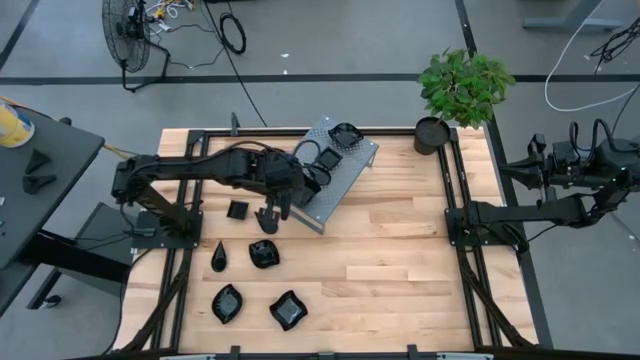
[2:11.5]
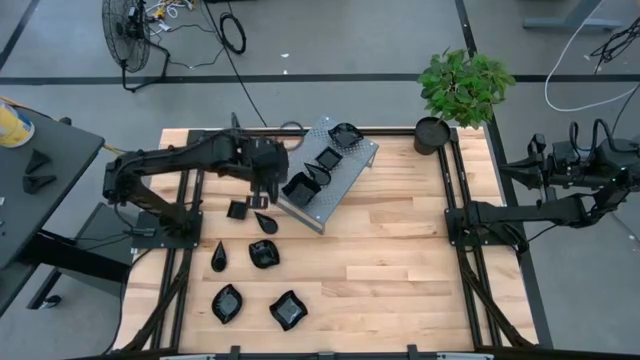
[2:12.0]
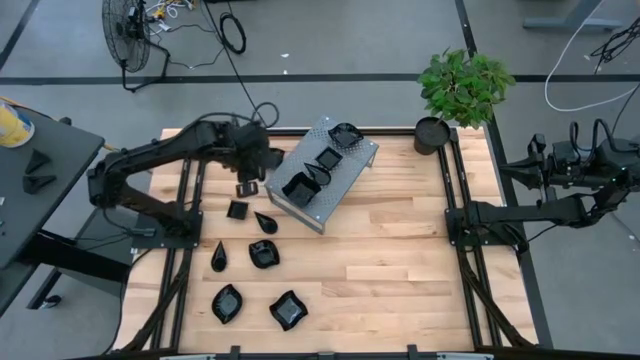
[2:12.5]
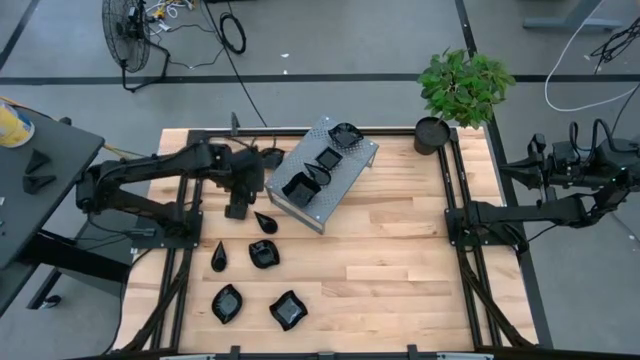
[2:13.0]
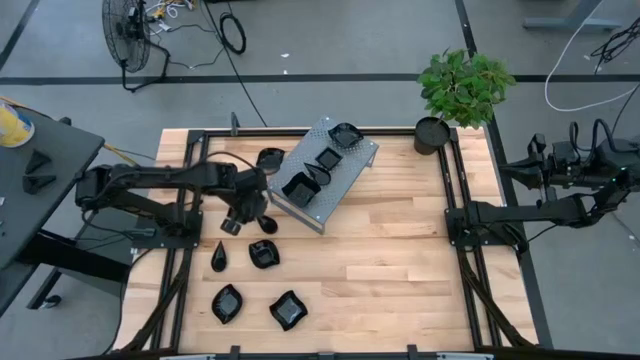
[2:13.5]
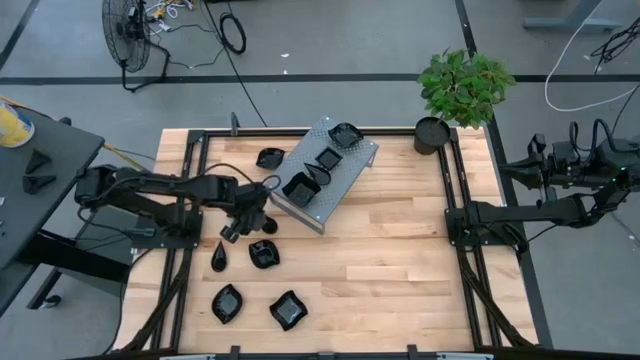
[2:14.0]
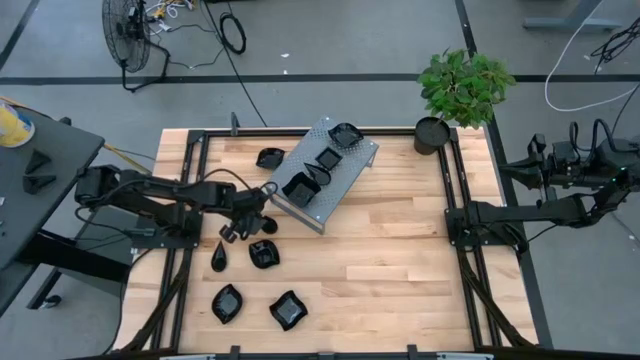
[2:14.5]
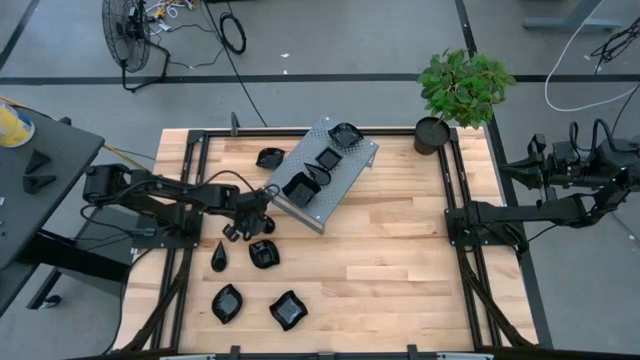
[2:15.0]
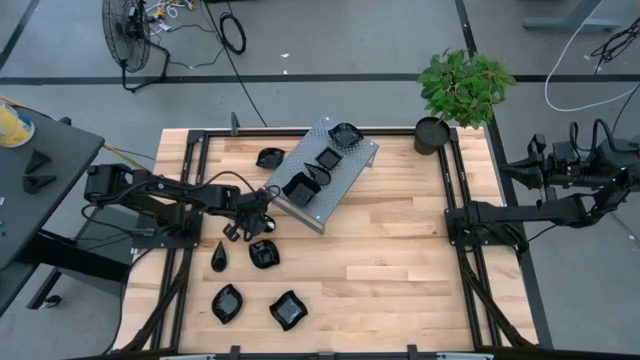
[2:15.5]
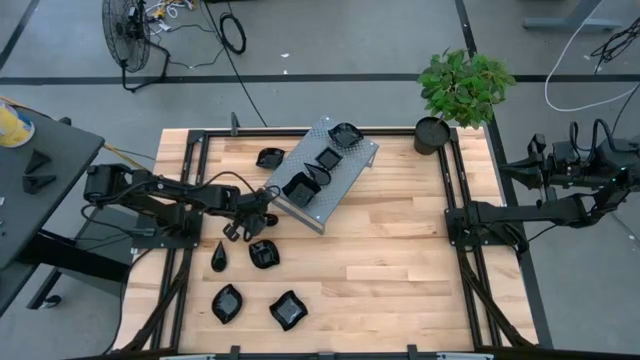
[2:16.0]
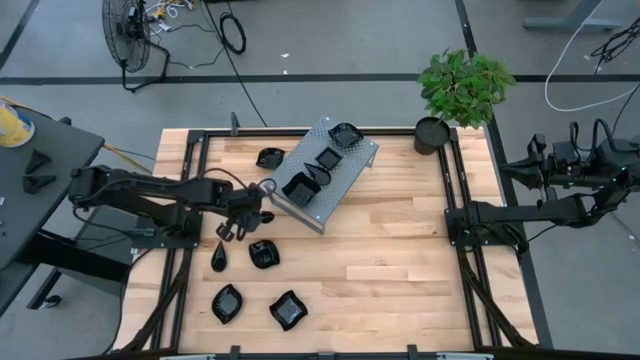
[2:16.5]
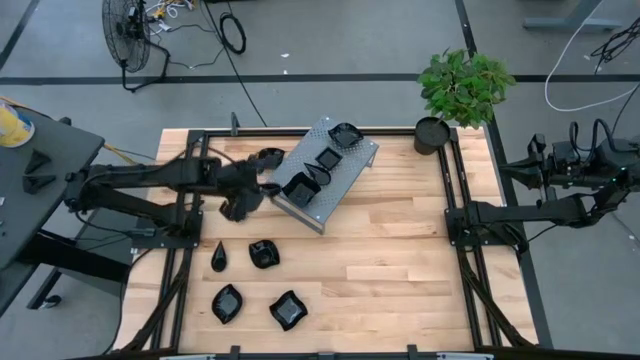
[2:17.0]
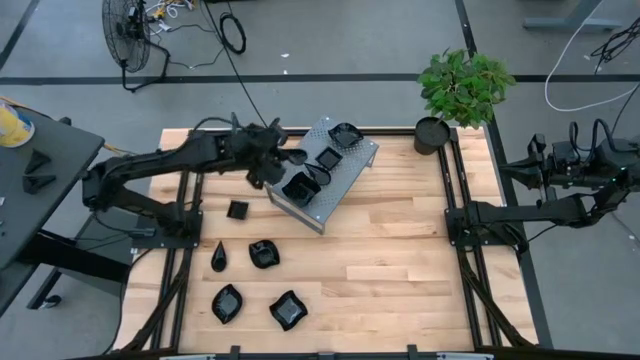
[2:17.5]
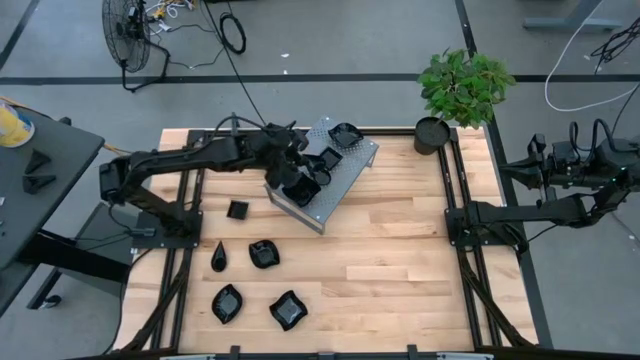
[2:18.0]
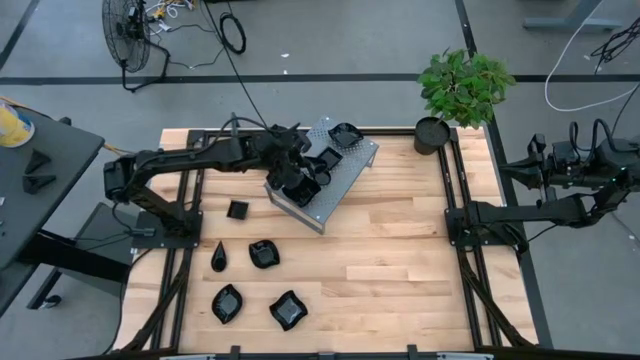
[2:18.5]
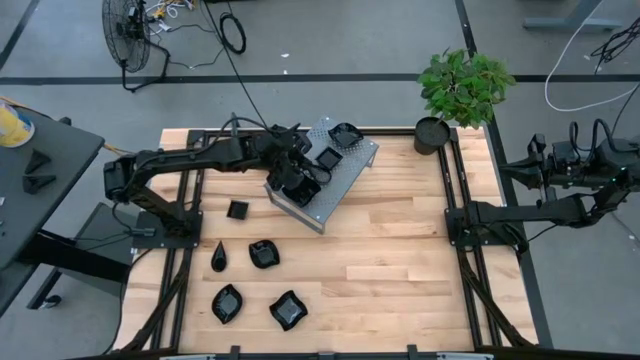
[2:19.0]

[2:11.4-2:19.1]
Task: Pick & Place Mini shaped plates
Stack the black drop shape plate on top of the black drop shape plate on the shelf

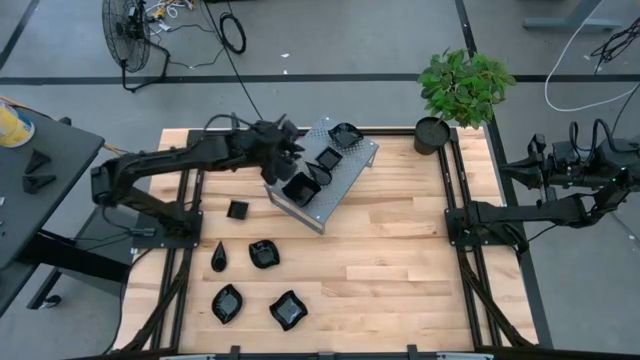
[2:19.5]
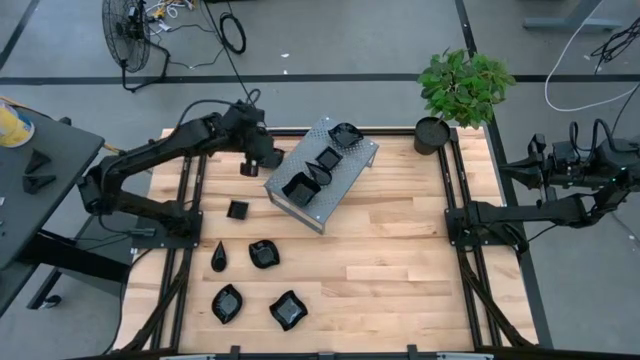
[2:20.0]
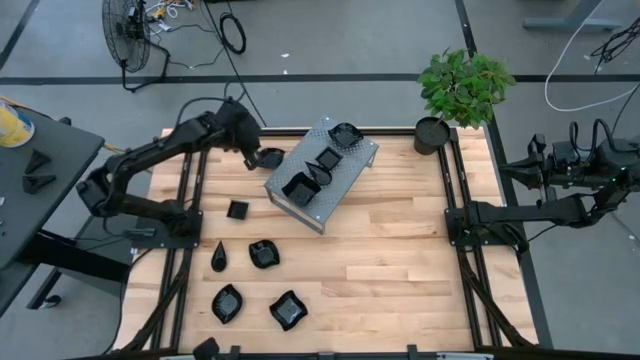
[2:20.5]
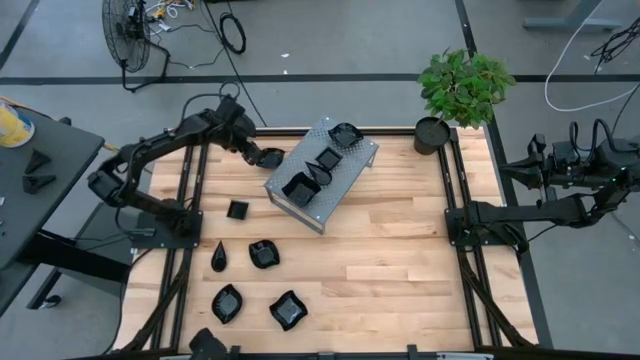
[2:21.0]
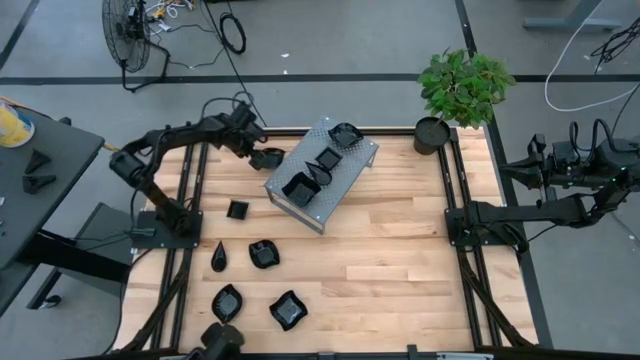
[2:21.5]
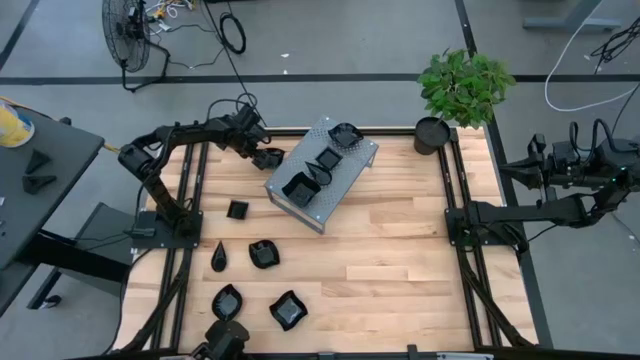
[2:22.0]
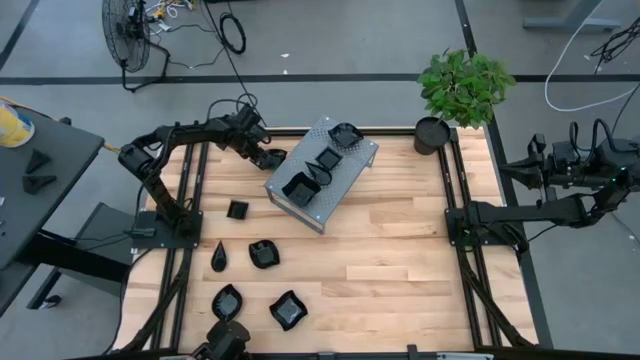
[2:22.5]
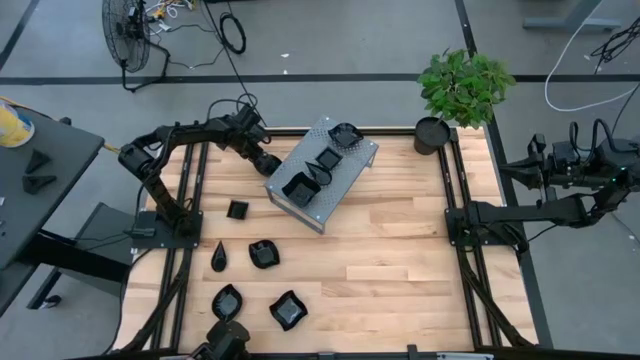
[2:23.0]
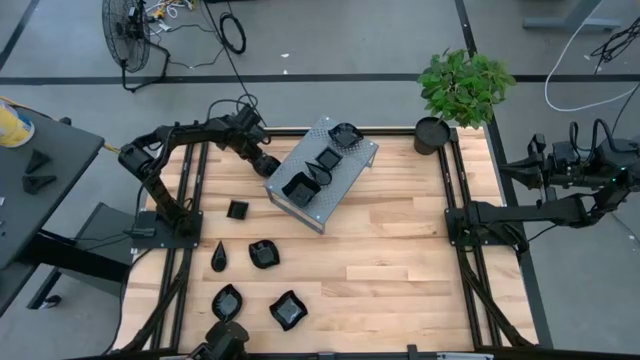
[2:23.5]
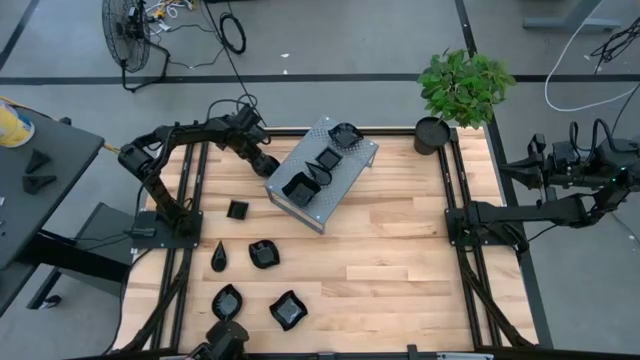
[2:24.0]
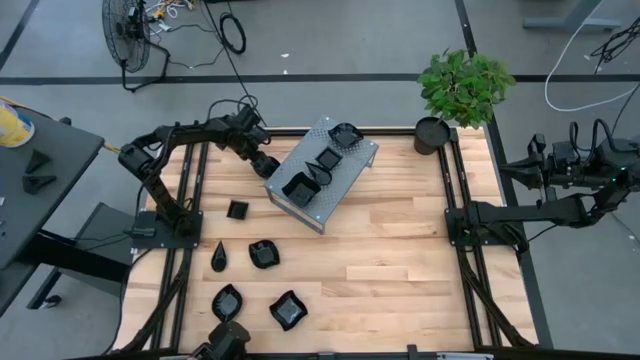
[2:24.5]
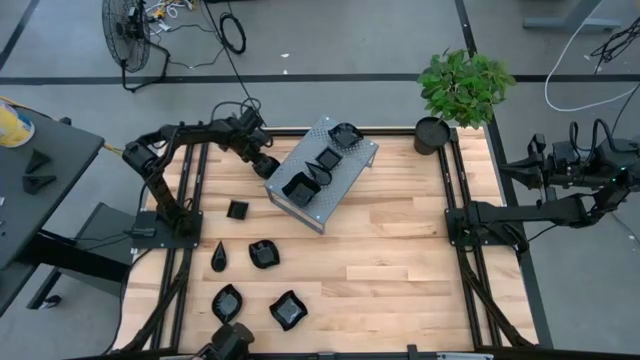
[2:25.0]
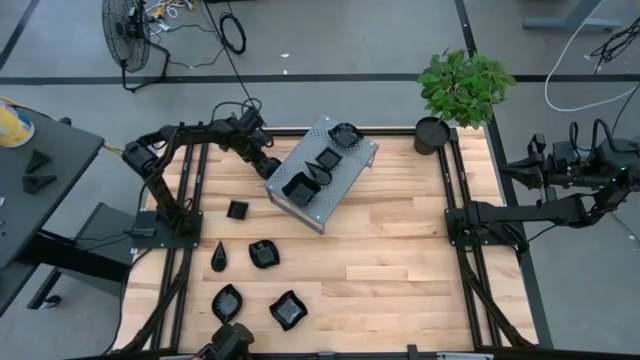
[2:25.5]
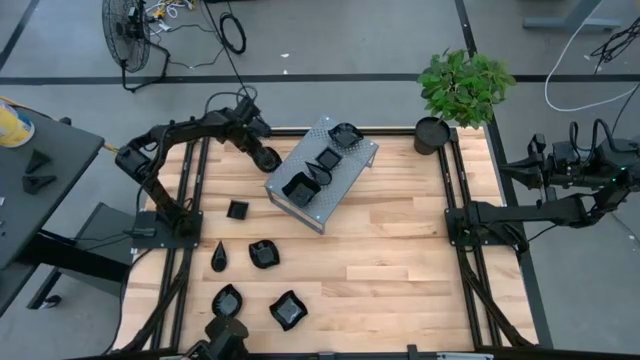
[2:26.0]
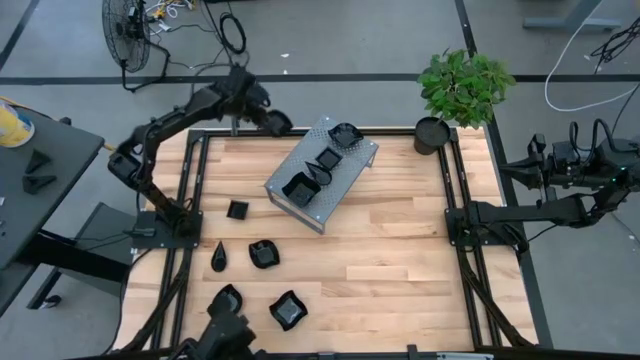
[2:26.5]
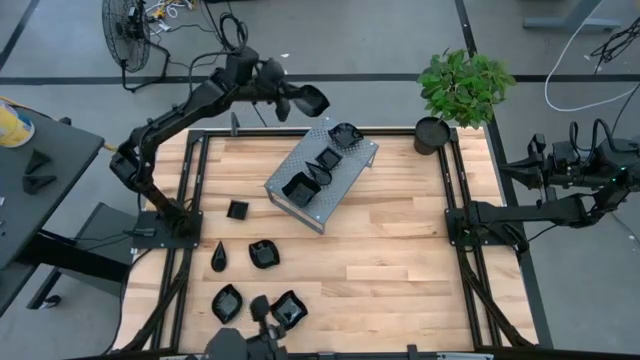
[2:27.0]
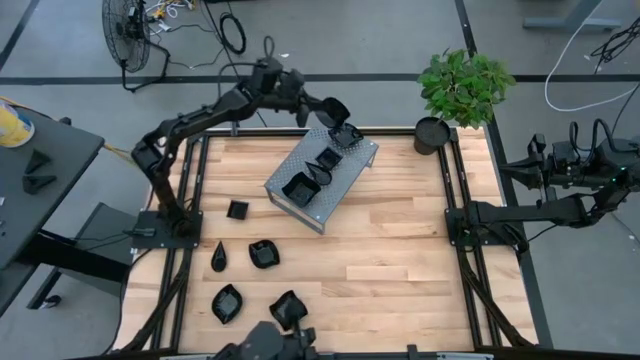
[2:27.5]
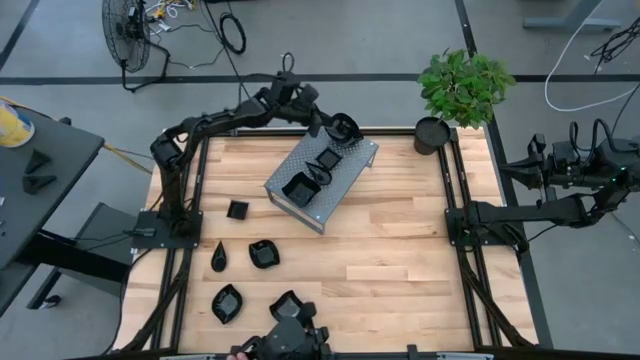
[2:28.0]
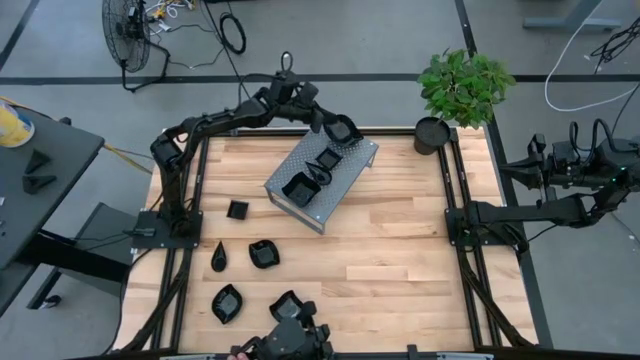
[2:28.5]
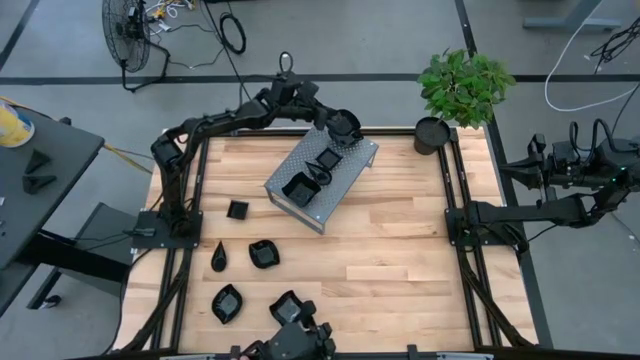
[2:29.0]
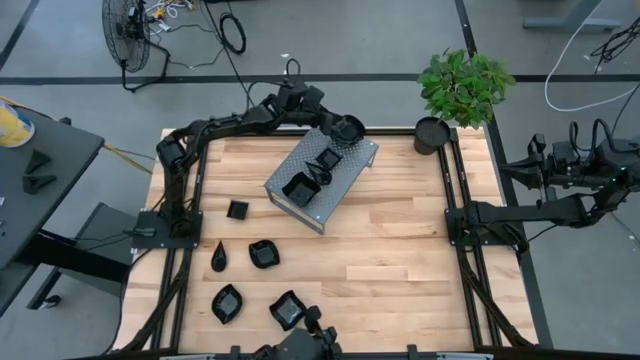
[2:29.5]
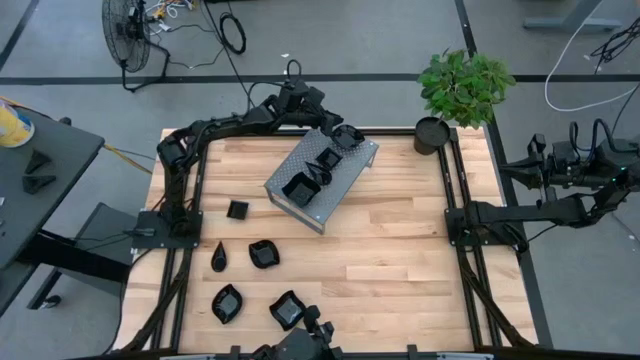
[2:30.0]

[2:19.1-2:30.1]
Stack the black leaf shape plate on top of the black leaf shape plate on the shelf

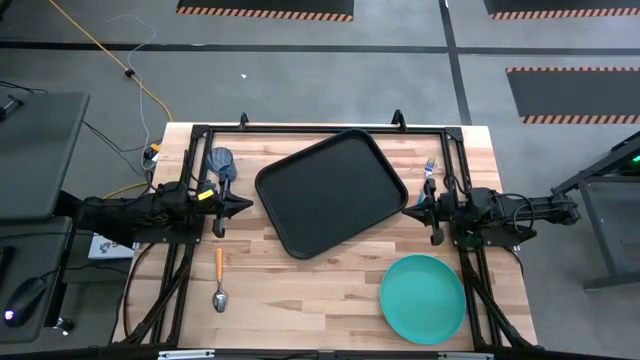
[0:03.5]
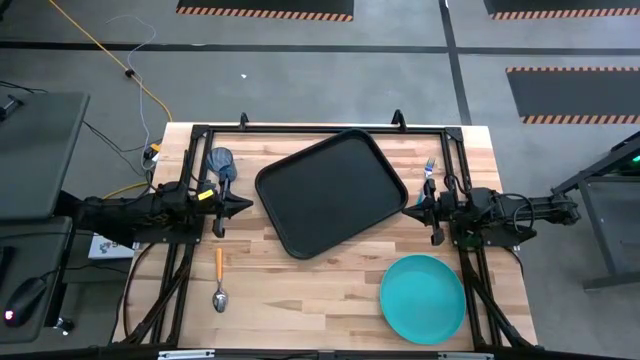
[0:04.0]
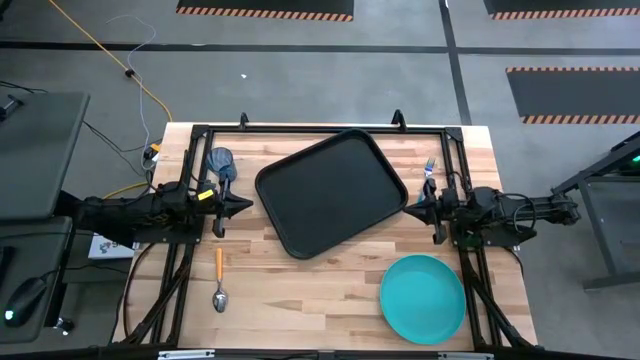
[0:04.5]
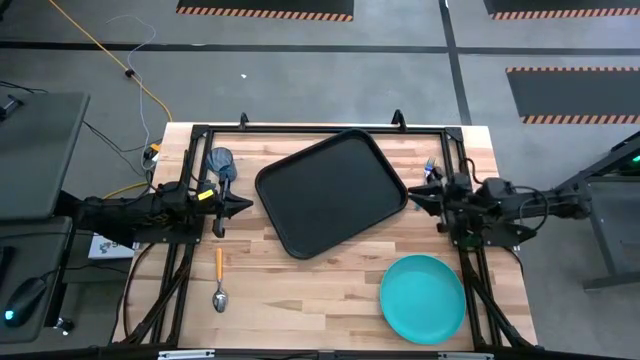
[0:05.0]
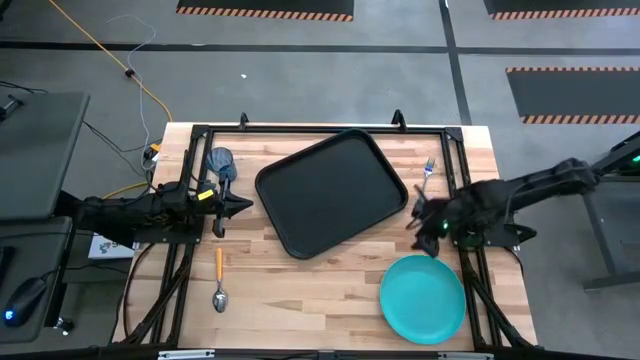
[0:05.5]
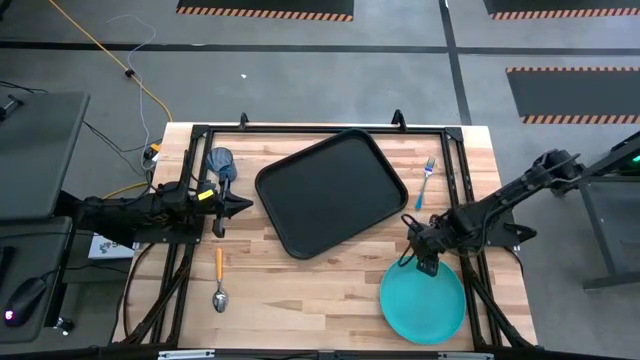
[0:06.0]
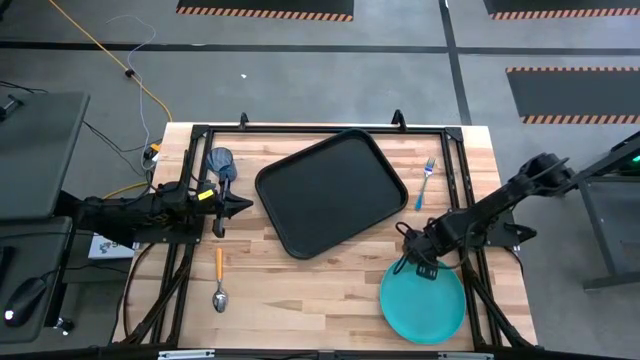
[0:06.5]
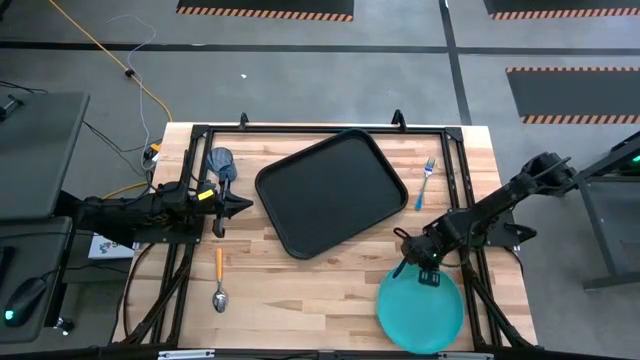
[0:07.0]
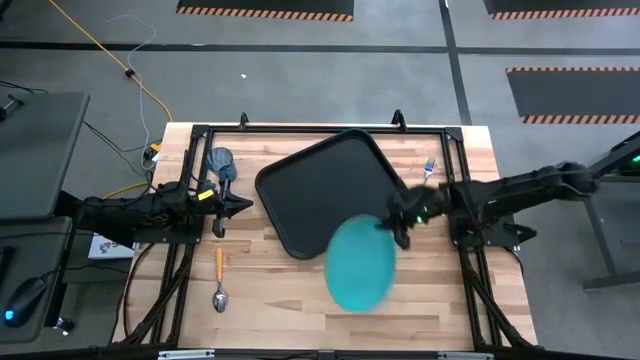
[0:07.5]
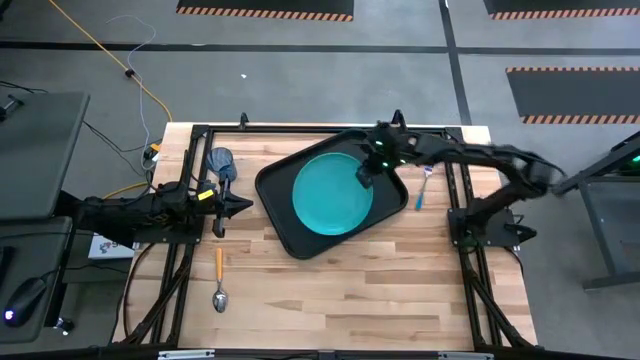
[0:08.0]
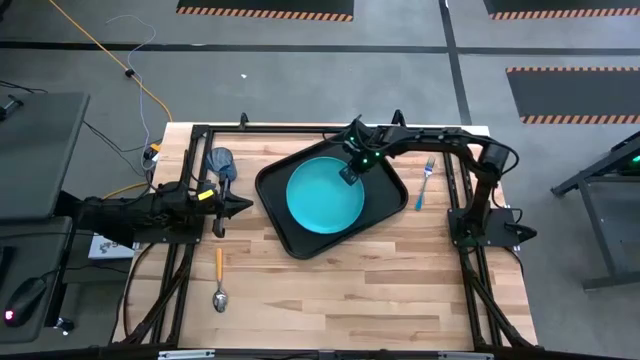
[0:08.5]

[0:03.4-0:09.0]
Task: Pick and place plate/cup/fork/spoon on tray
Put the light blue plate on the center of the black tray
